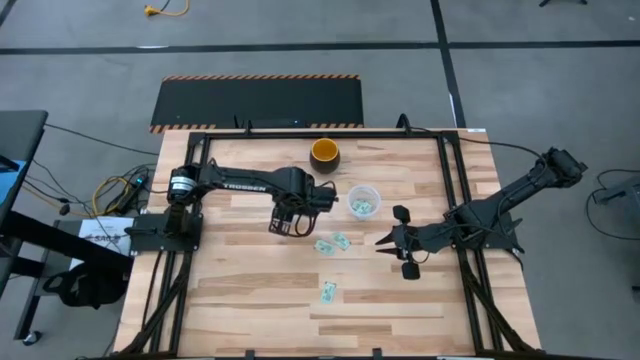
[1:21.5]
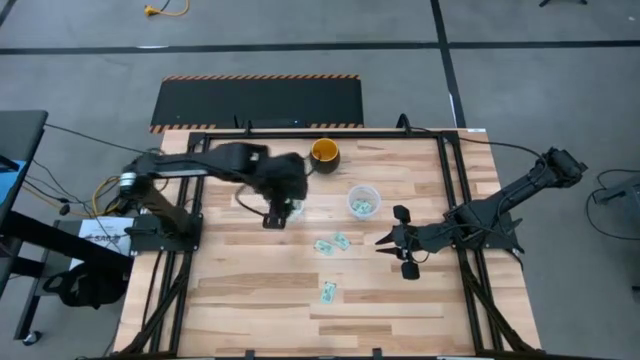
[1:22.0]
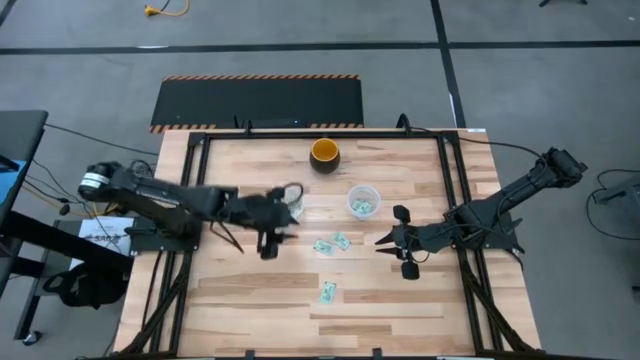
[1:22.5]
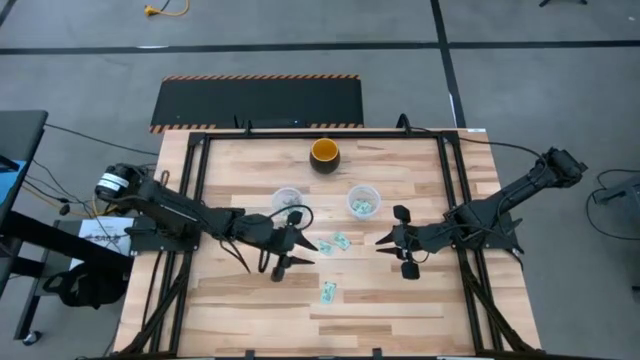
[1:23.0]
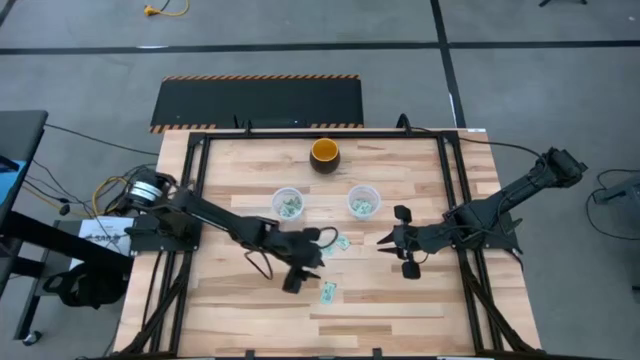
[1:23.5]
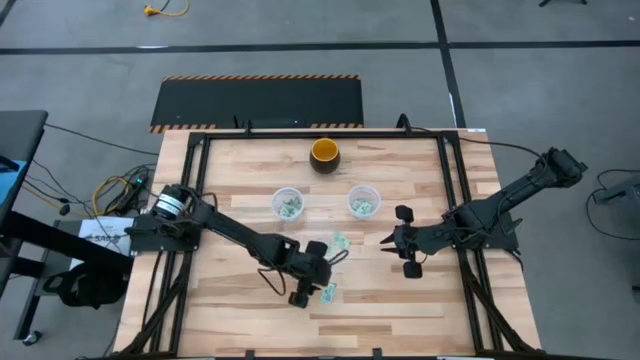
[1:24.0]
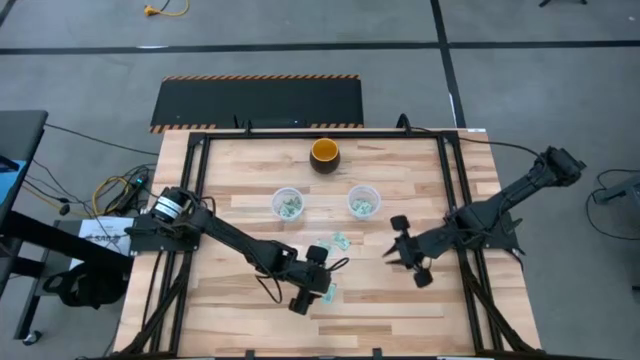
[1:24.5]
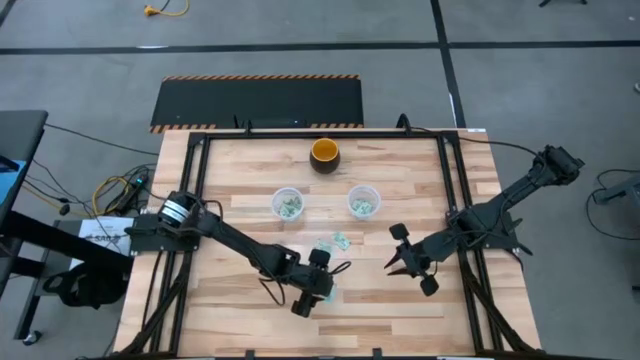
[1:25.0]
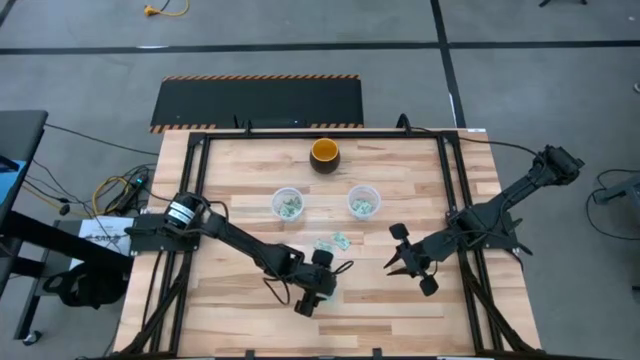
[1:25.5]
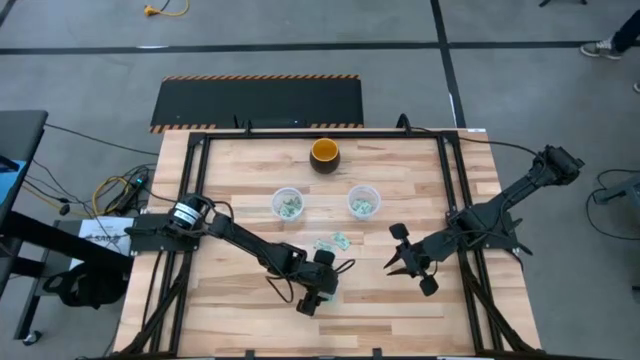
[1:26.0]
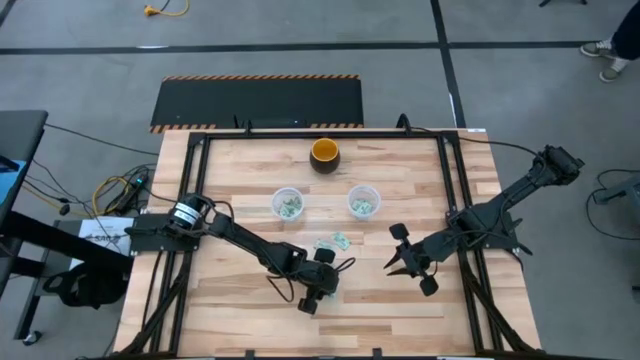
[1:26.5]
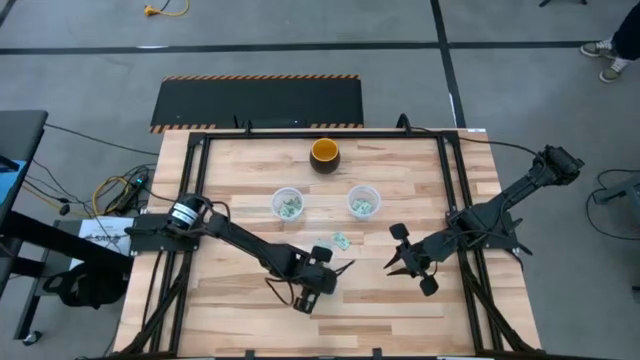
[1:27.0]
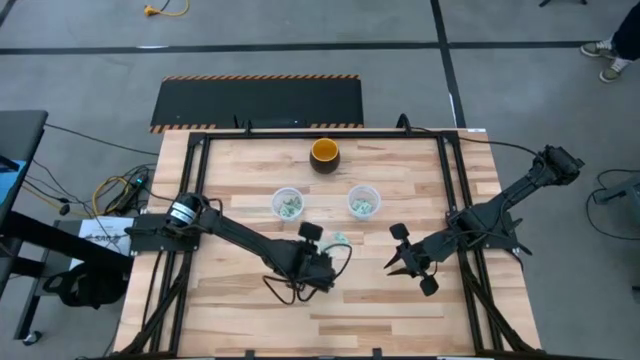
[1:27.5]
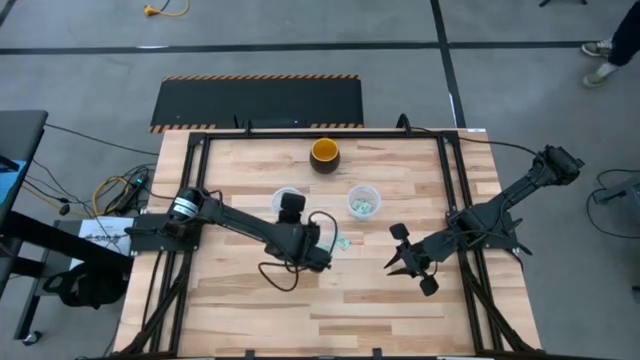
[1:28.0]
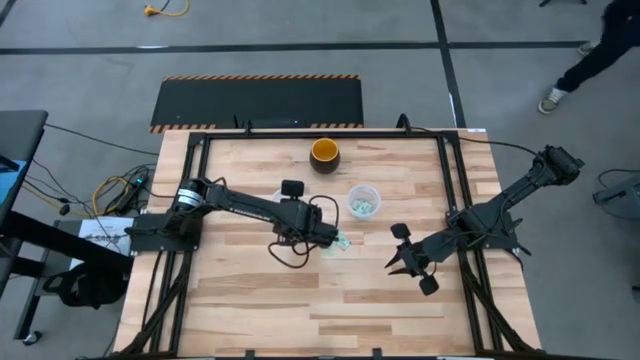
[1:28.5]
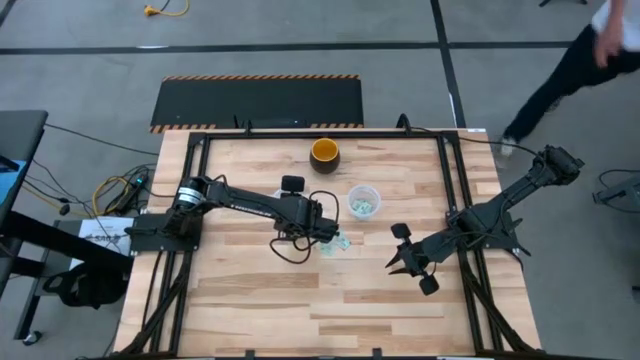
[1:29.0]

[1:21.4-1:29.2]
Task: Pick and place Stevia / Truvia into bins
Put the stevia packet into the left transparent container

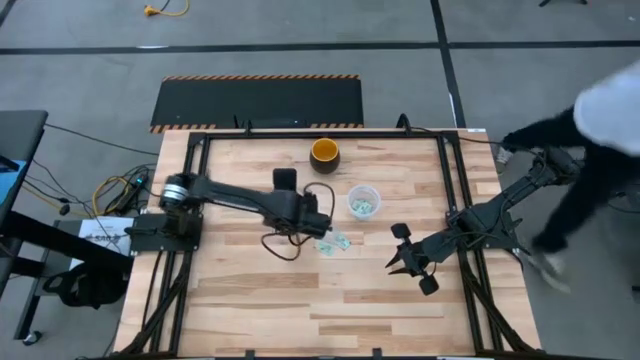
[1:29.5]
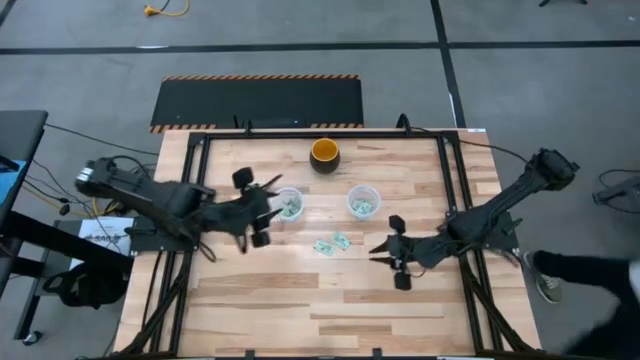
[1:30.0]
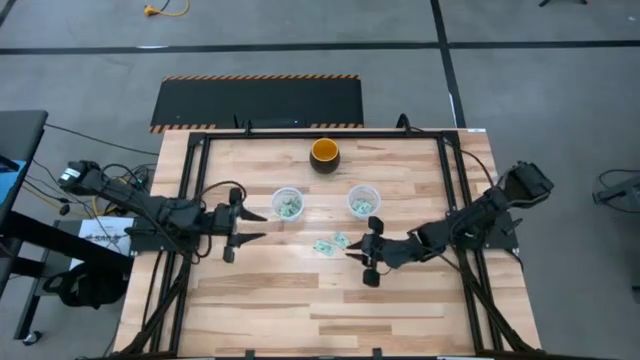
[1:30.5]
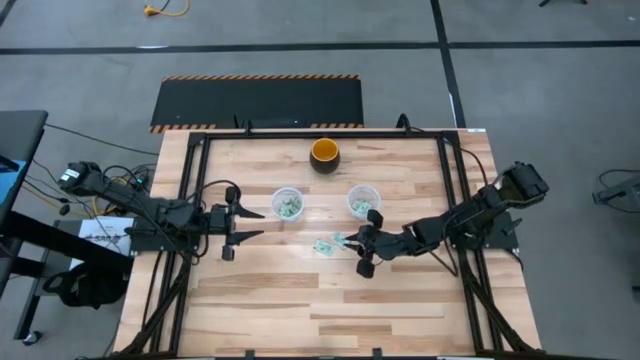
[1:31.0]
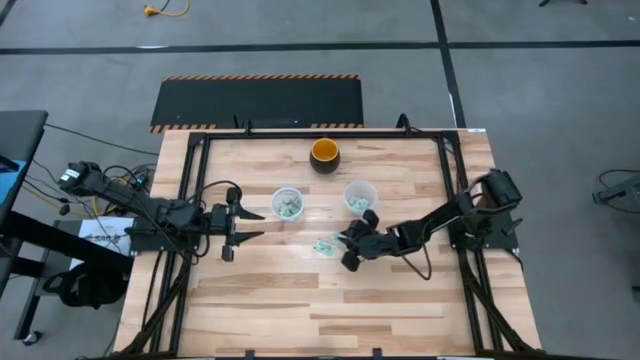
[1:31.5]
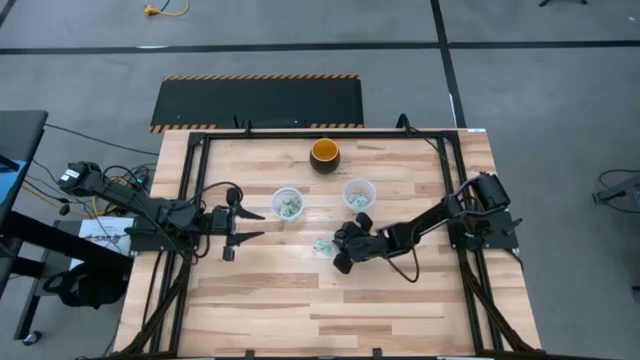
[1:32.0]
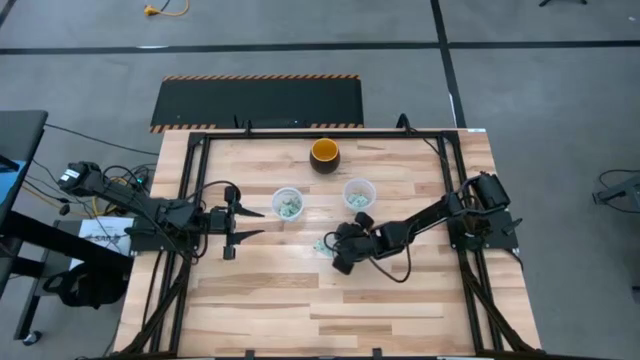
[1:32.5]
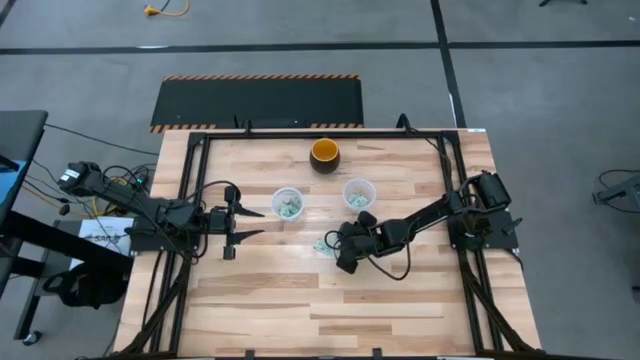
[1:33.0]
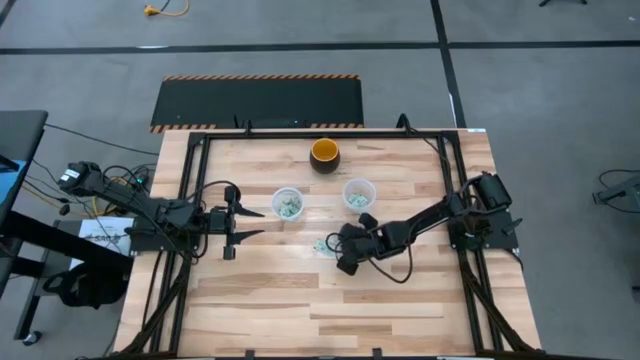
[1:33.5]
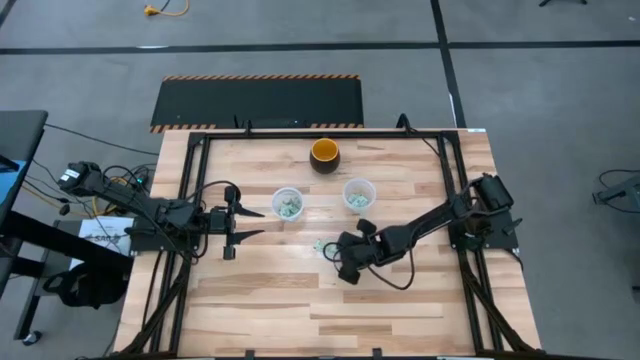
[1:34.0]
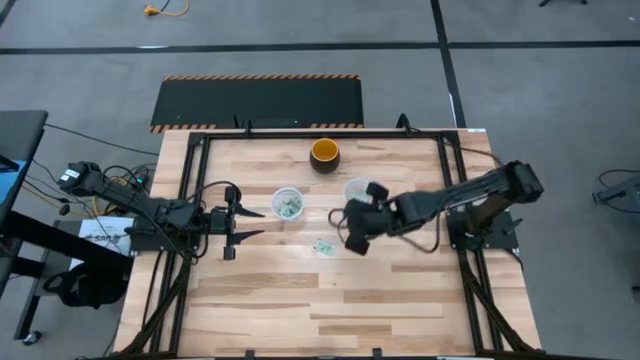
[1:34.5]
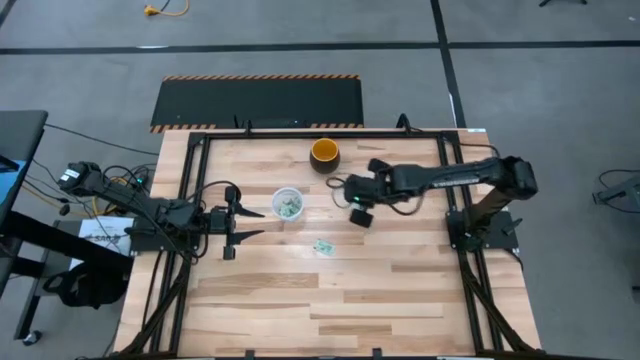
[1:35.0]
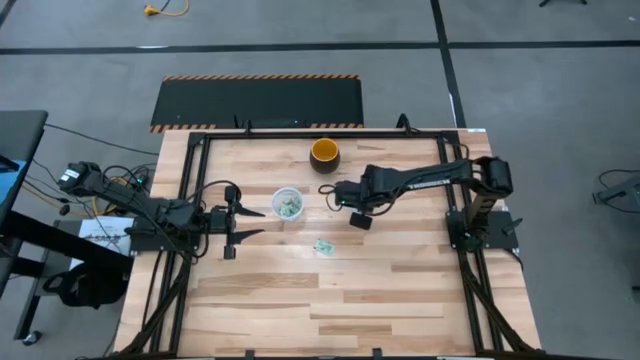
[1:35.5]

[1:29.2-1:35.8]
Put the stevia packet into the right transparent container

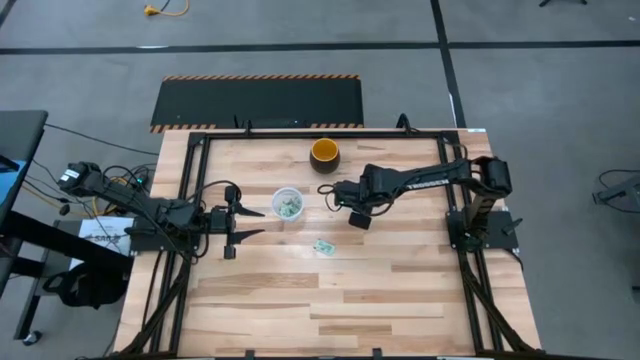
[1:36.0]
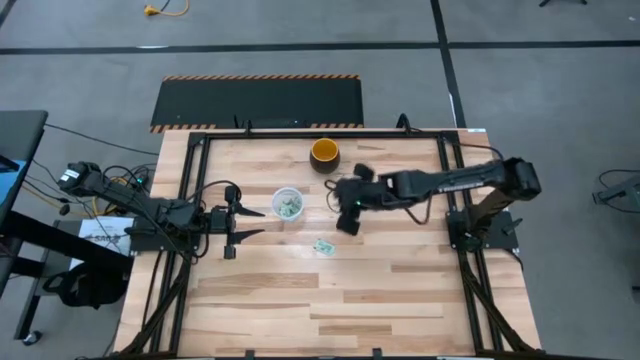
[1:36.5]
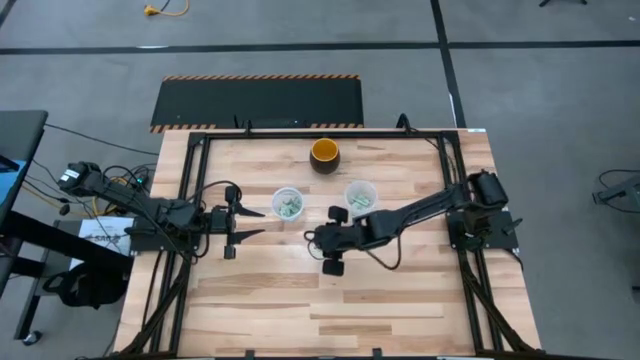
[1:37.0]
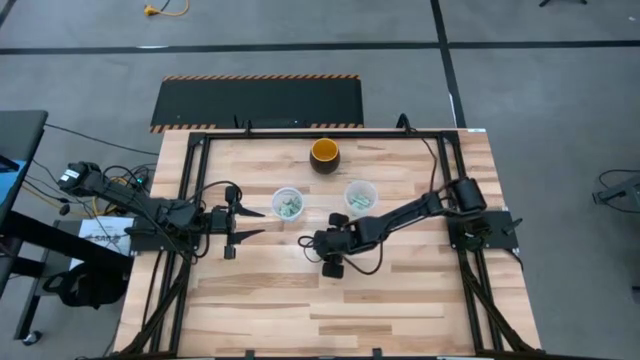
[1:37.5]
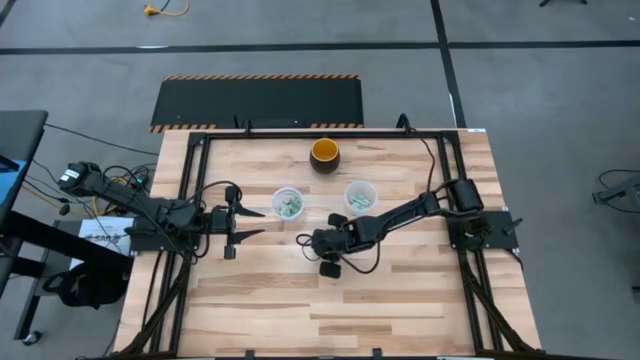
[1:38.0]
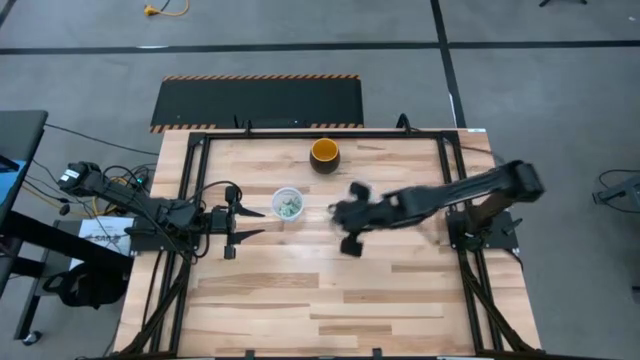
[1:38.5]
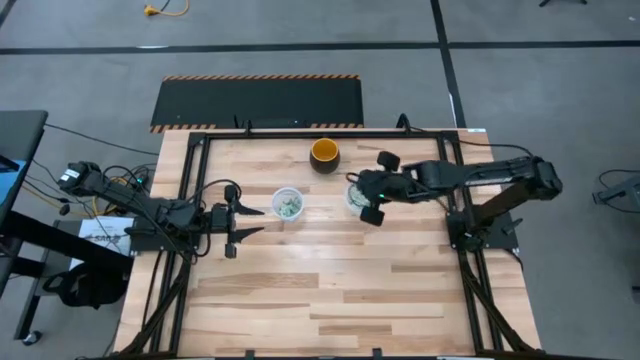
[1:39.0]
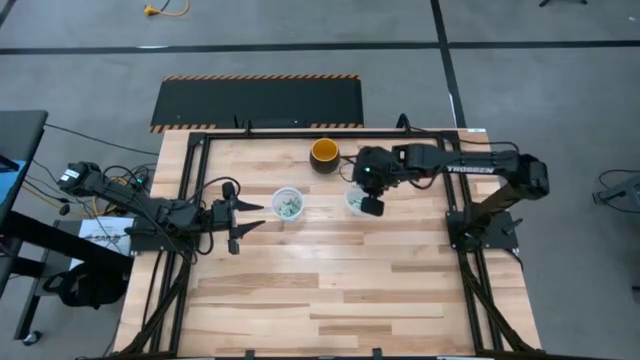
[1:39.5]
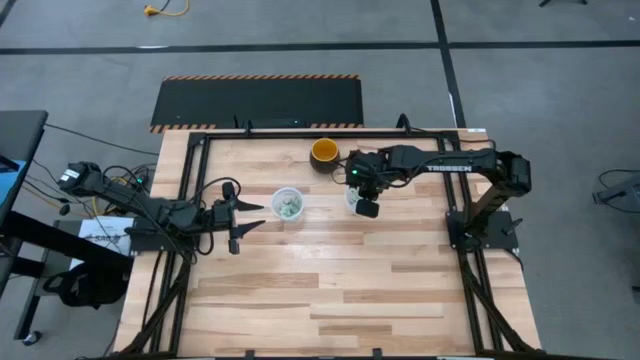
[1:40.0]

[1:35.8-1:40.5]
Put the stevia packet into the right transparent container

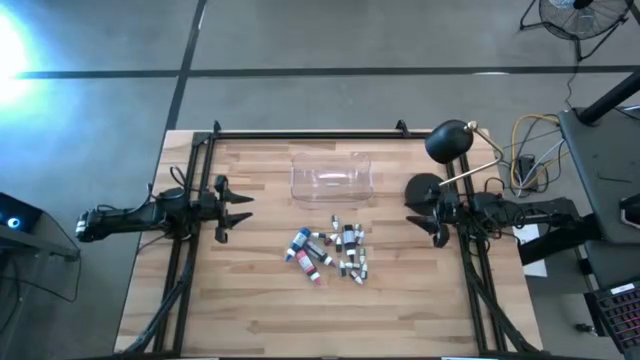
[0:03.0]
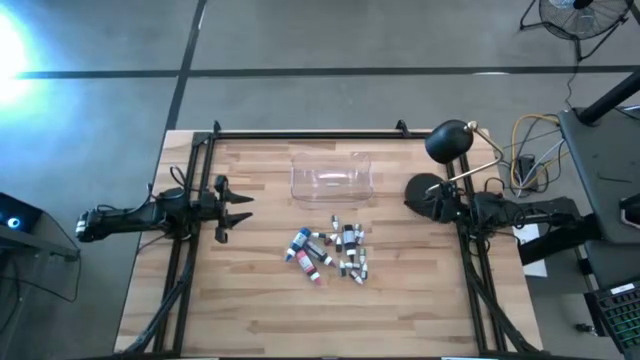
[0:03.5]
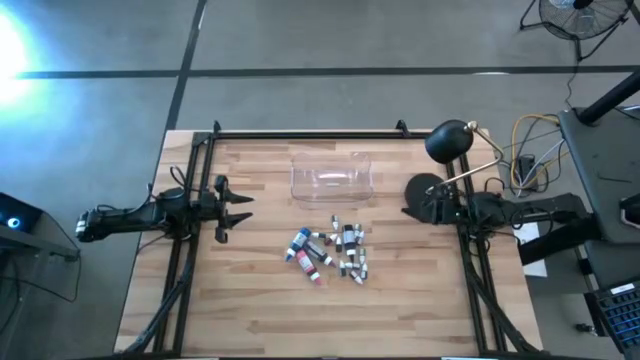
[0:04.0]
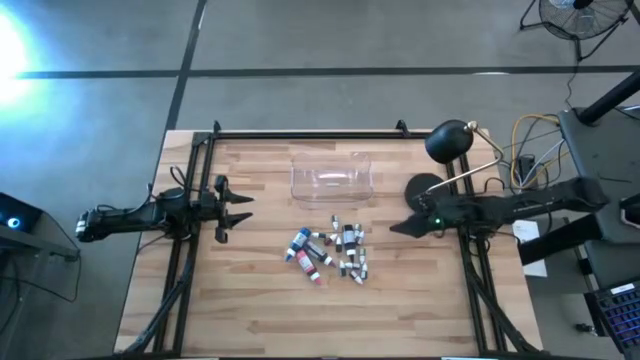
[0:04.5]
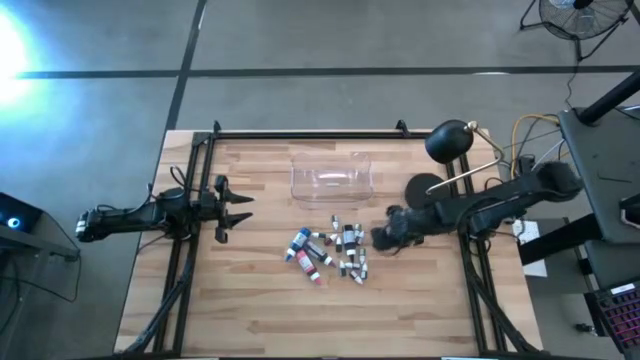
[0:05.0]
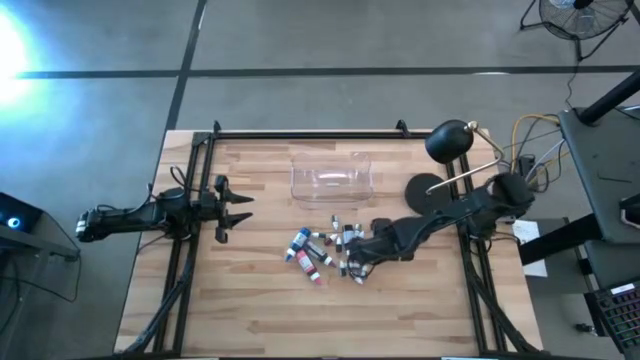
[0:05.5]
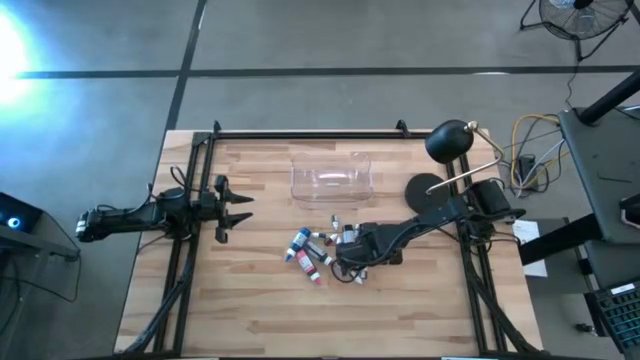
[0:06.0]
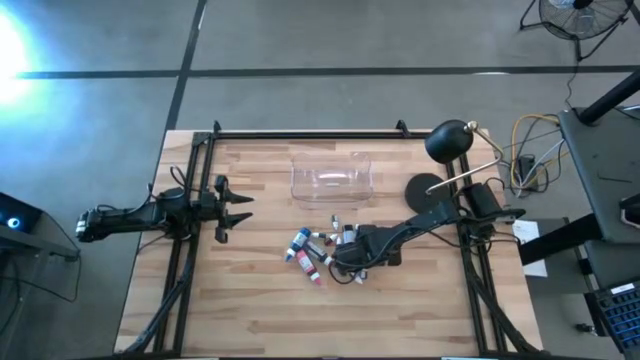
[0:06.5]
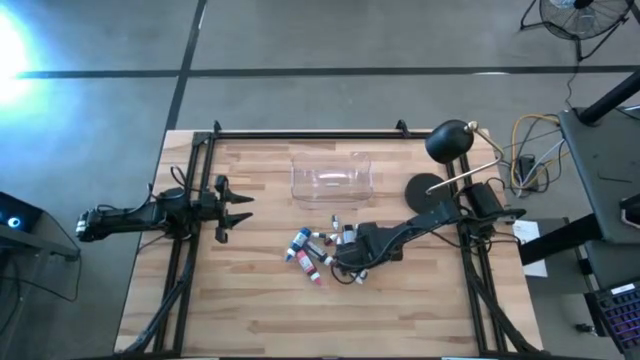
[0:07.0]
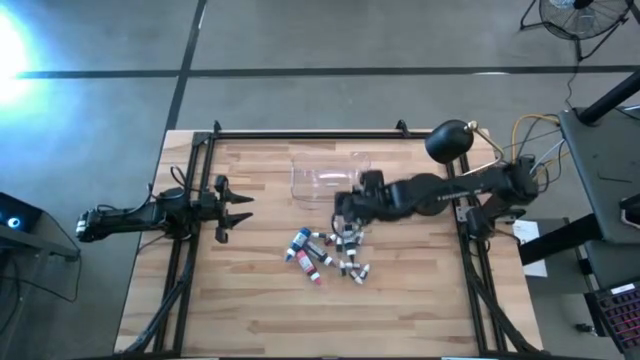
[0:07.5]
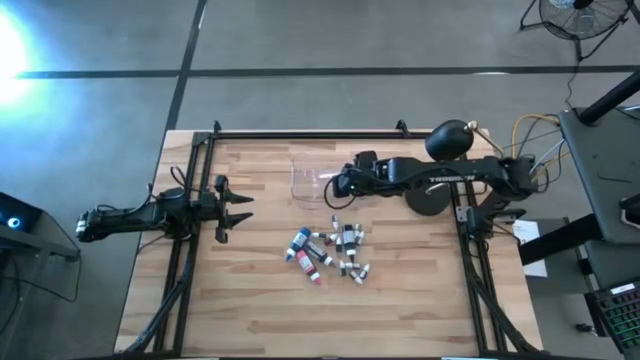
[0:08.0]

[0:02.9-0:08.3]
Task: Pick & Place food coloring
Put the small green food coloring bottle into the transparent bin
